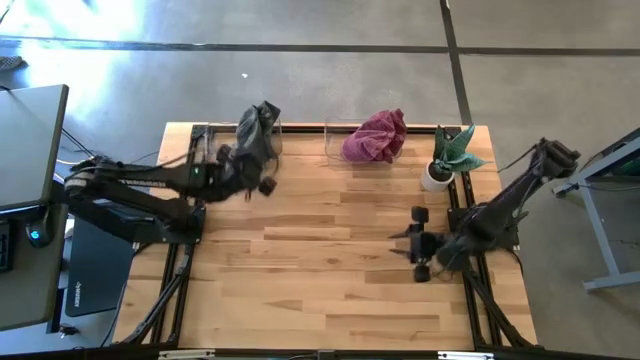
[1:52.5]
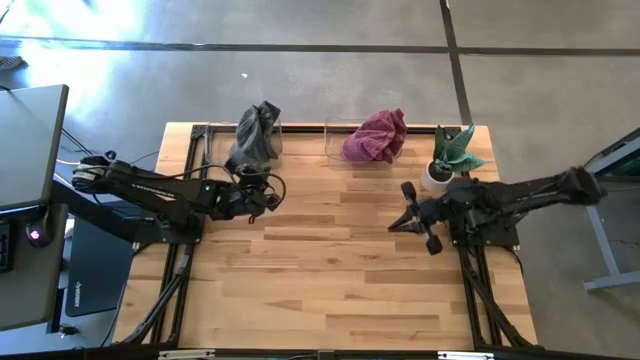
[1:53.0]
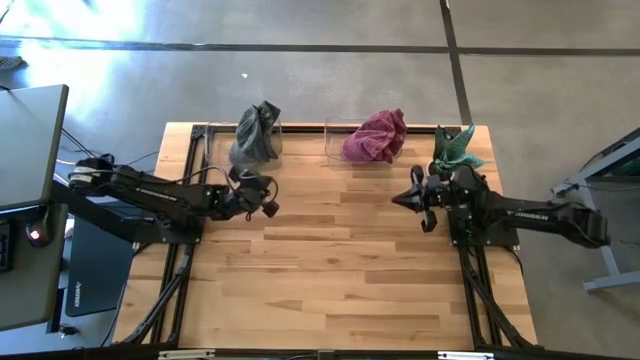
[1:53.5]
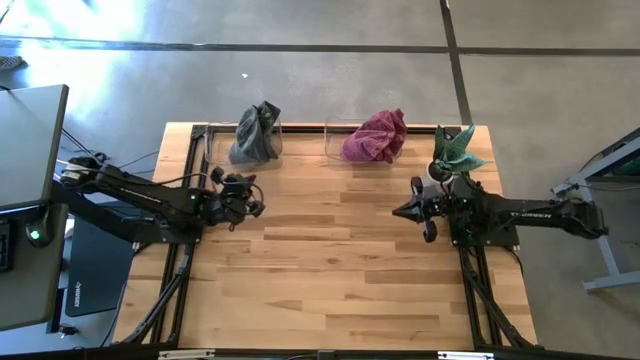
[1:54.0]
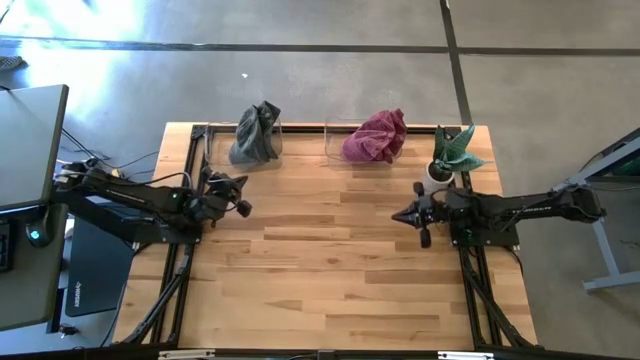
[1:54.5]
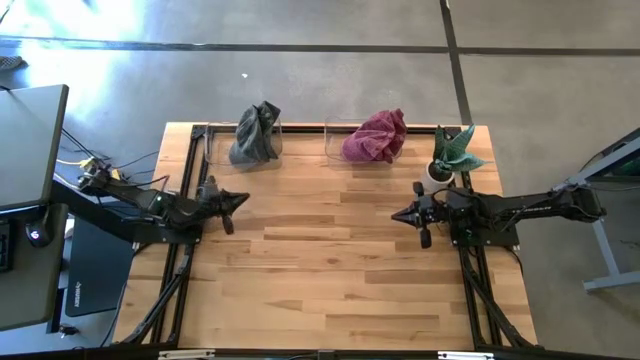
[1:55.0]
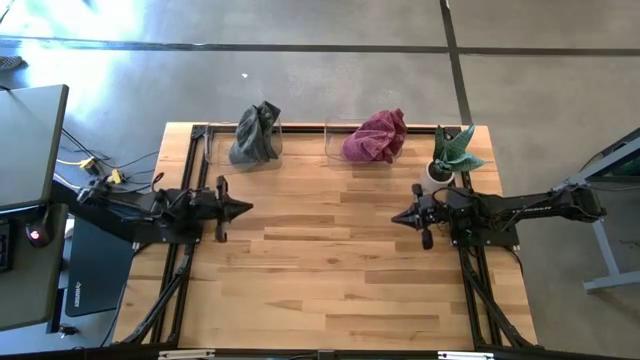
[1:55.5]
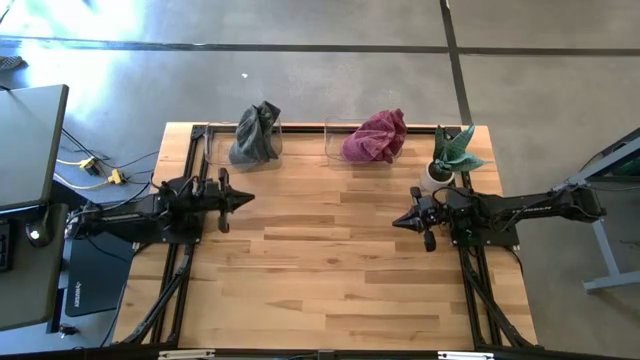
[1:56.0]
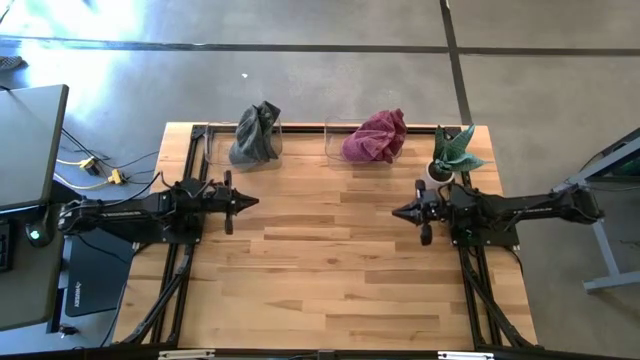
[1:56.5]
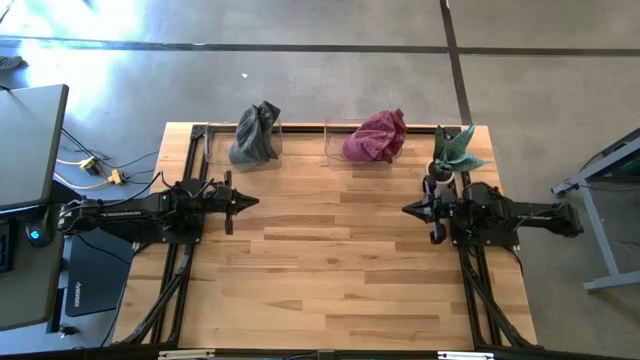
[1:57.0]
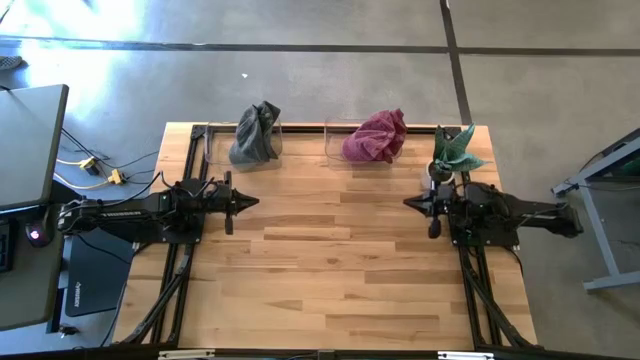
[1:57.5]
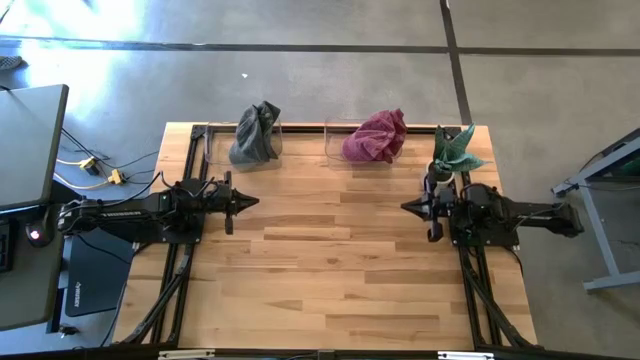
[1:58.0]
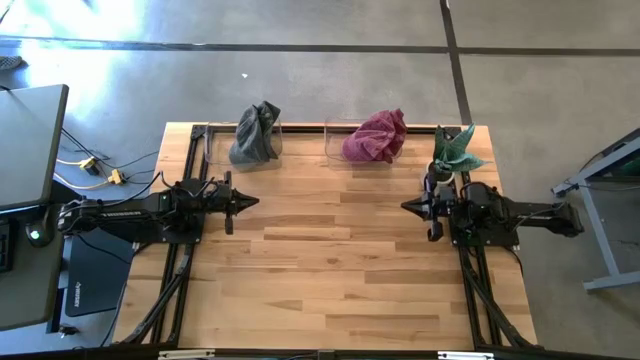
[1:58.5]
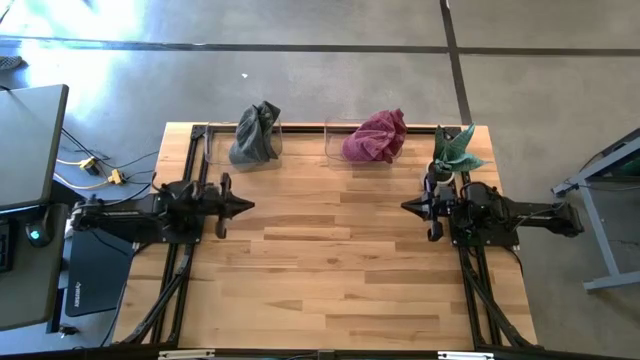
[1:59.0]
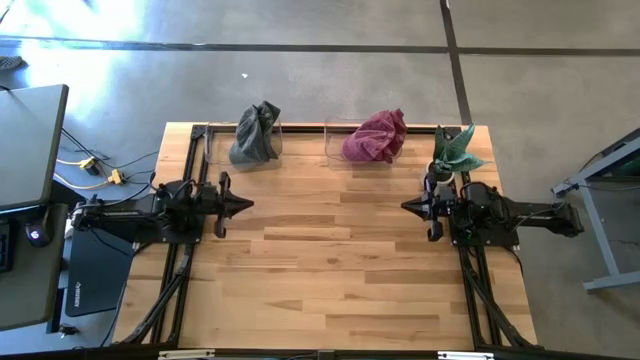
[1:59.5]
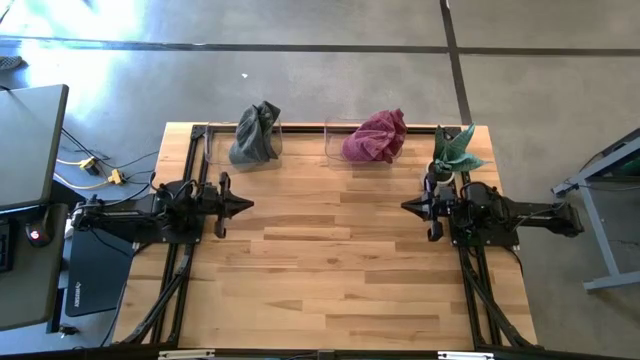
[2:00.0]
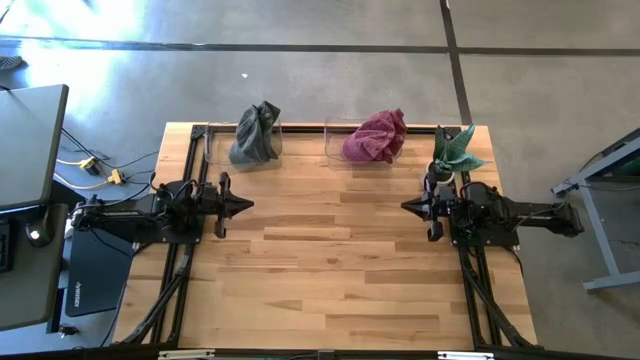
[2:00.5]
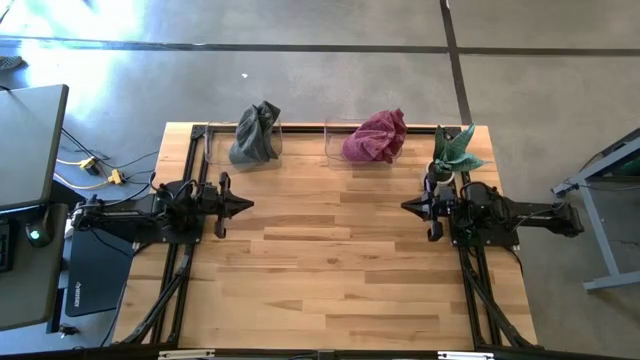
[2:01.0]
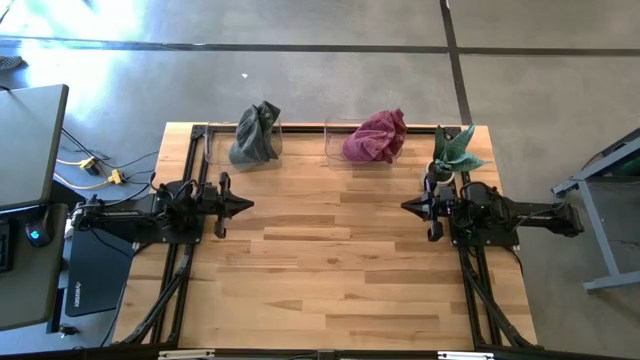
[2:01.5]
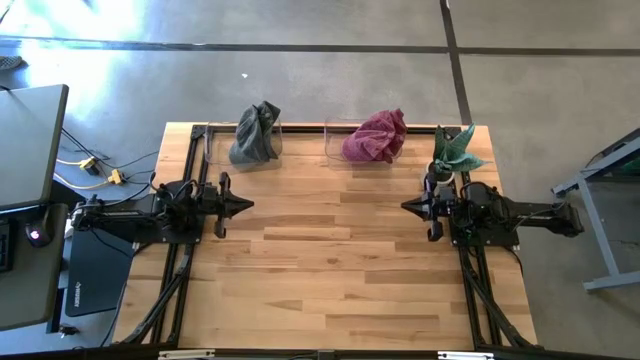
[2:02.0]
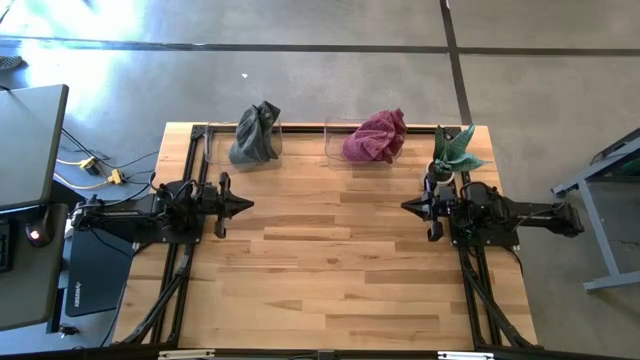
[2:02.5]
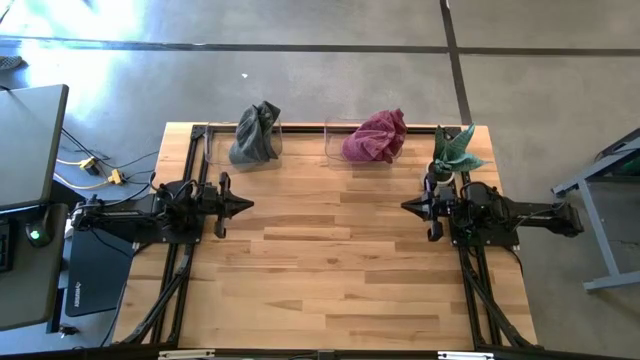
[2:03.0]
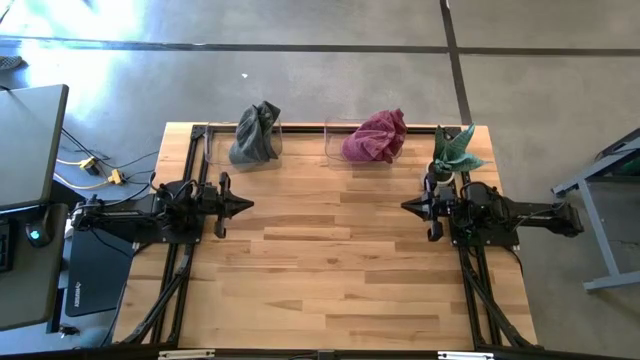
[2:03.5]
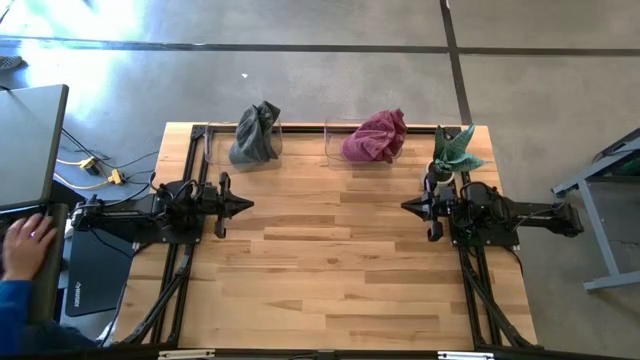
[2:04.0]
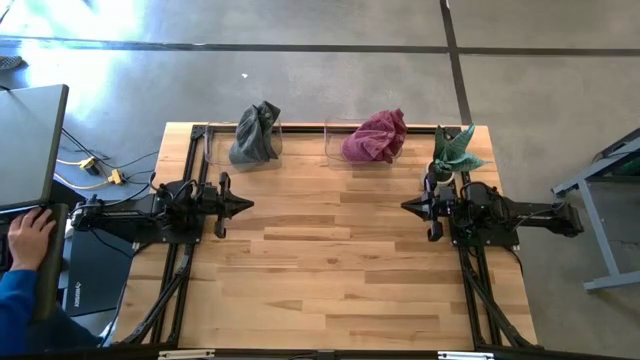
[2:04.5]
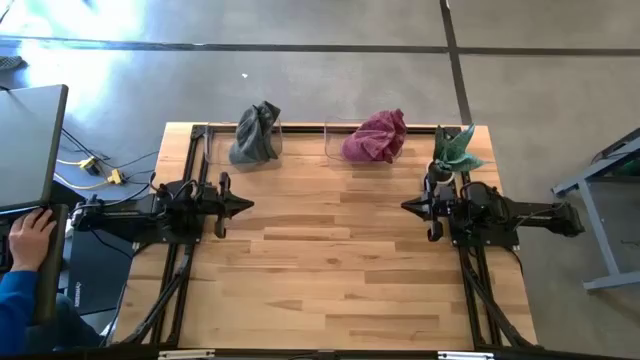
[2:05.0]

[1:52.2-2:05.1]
Task: Pick & Place hat
Return to Home Position

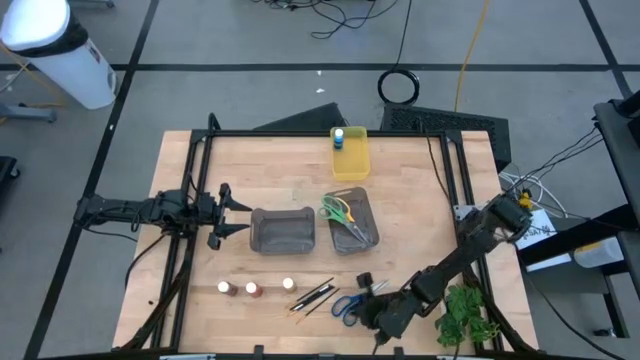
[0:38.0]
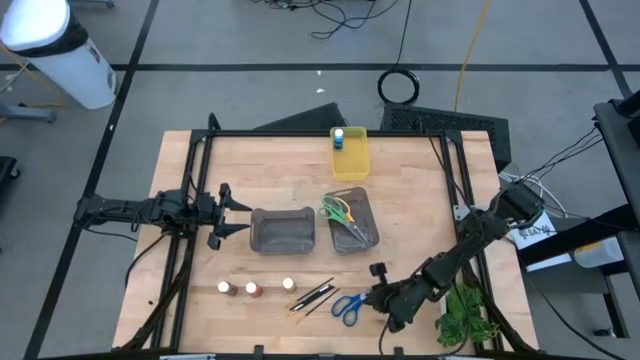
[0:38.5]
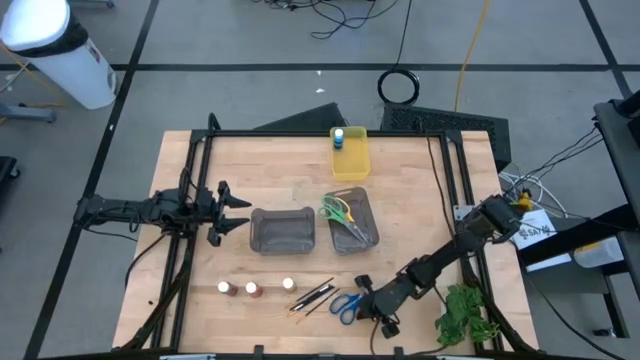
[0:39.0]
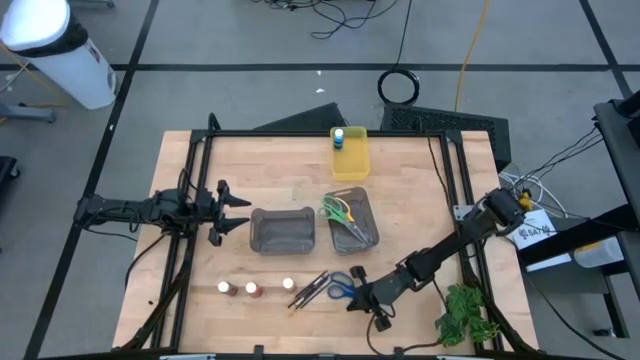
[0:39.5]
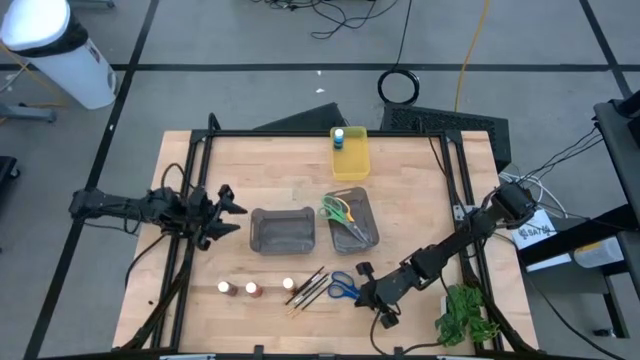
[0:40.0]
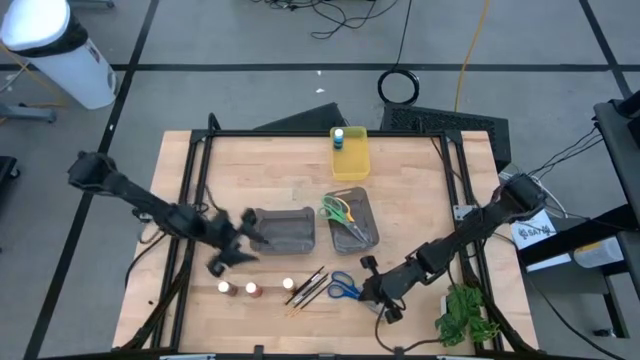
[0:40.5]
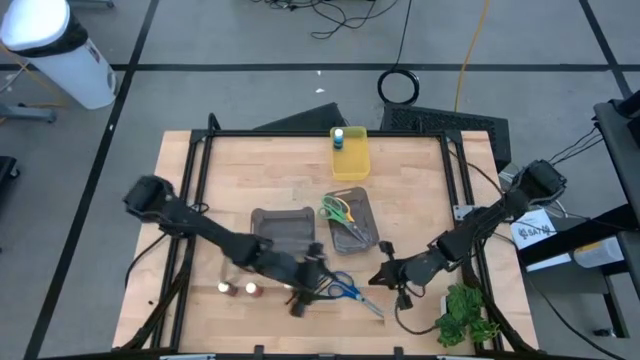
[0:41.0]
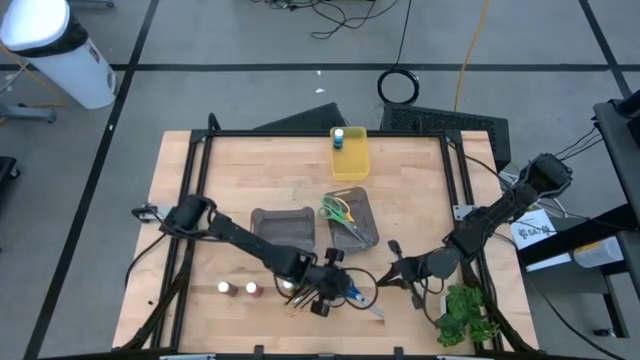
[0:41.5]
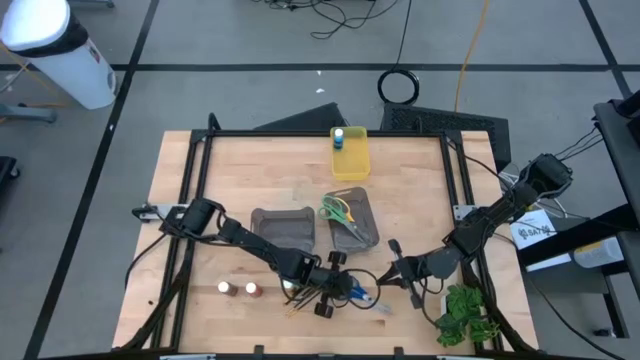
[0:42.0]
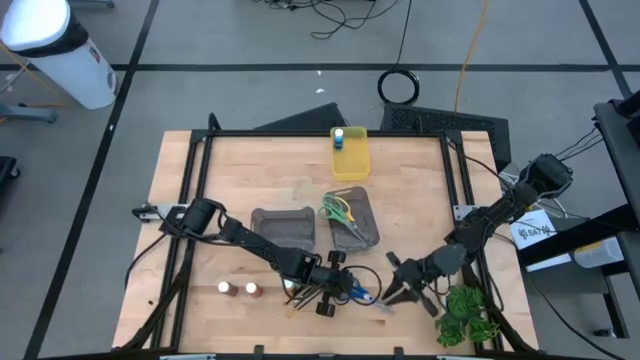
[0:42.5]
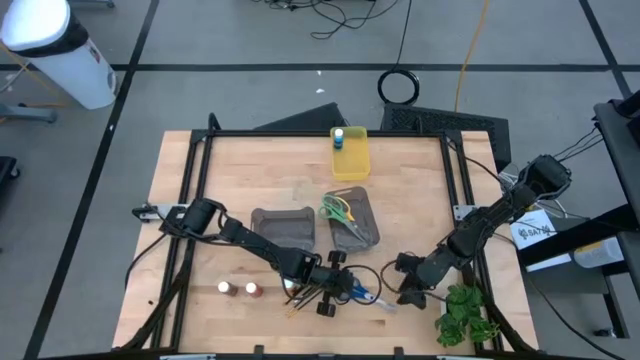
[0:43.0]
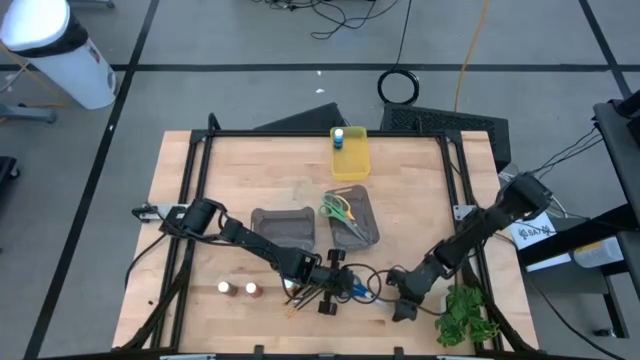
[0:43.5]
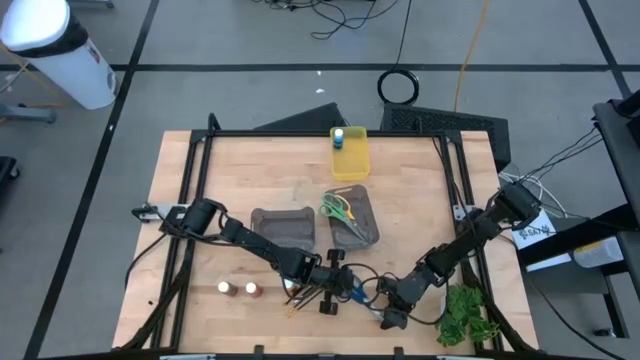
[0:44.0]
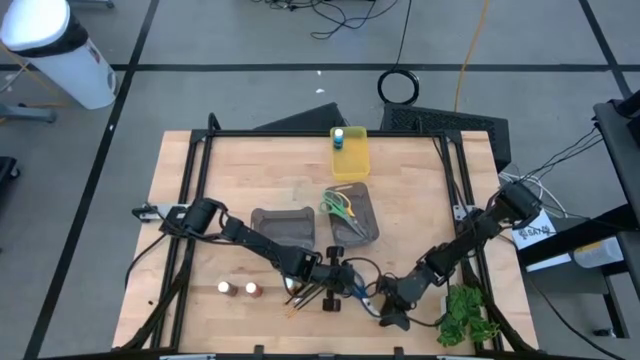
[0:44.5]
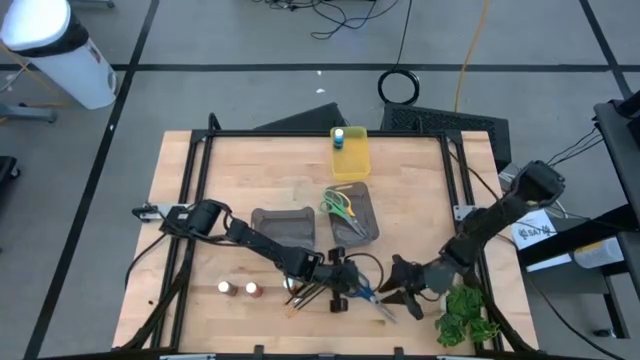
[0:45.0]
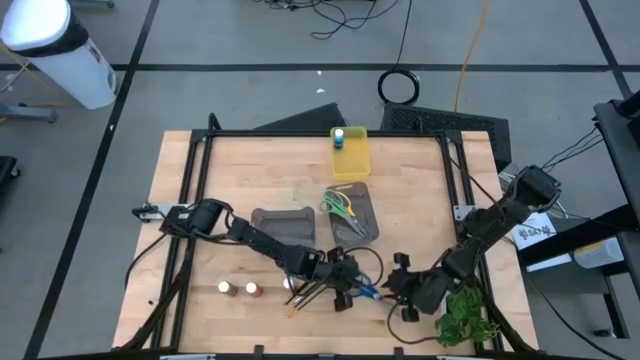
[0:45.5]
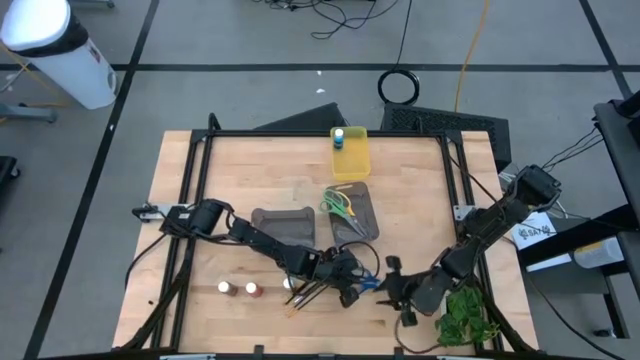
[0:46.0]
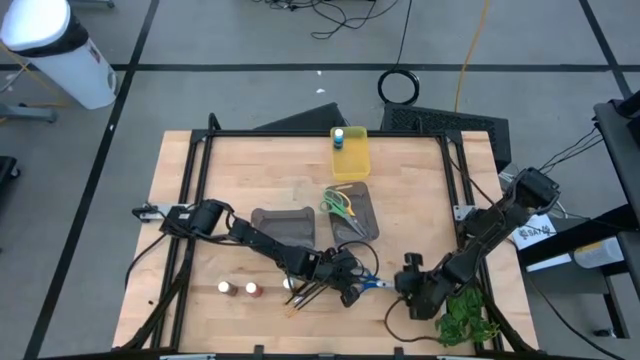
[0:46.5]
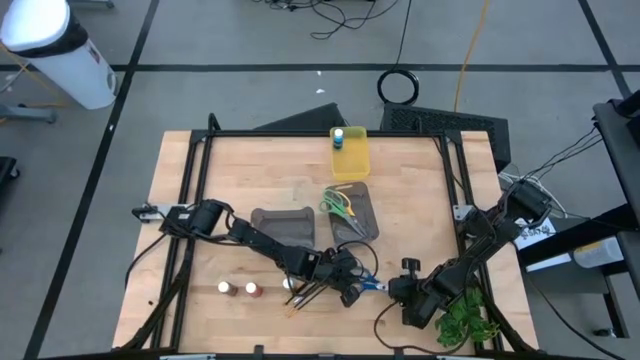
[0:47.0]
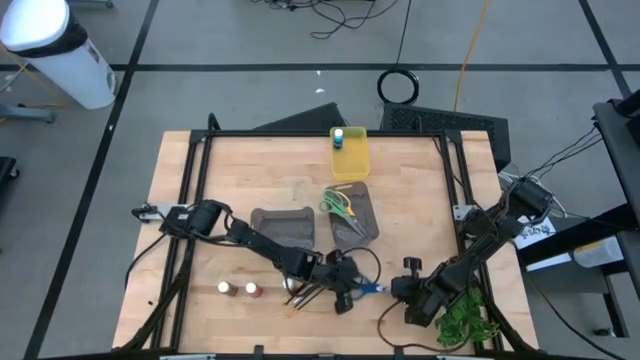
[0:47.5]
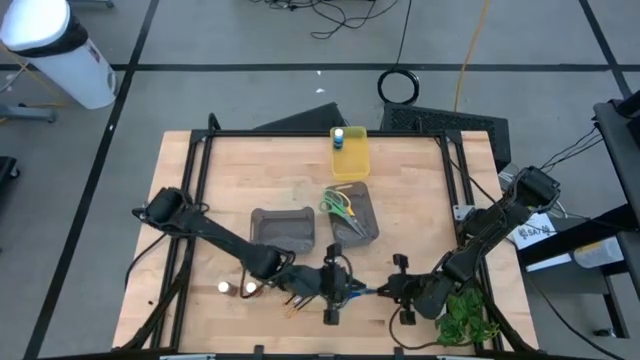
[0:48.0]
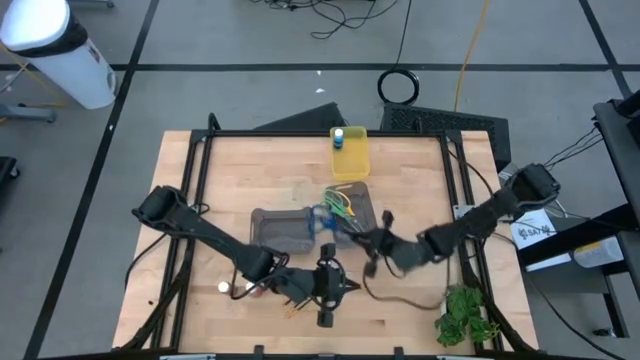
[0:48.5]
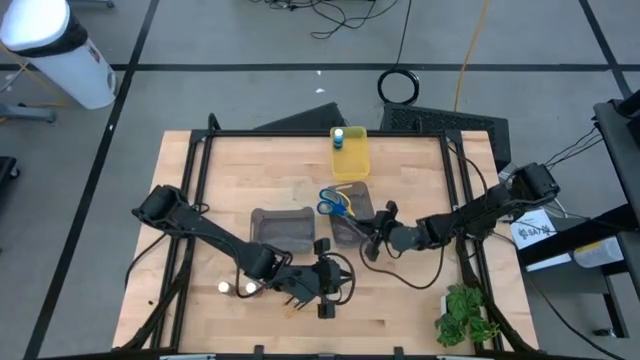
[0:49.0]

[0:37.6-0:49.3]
Task: Pick & Place Paint Supplies
Put the blue scissors into the right bin
